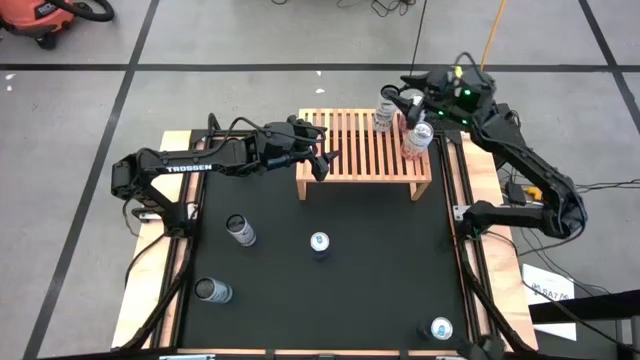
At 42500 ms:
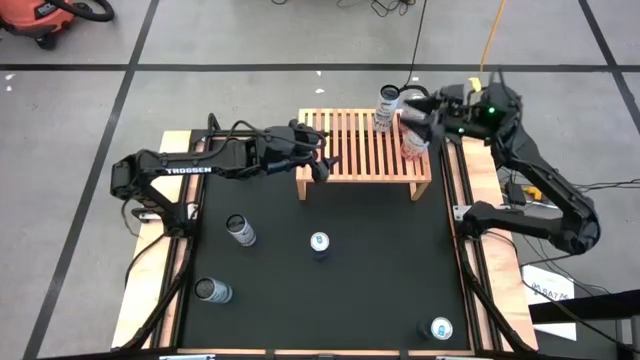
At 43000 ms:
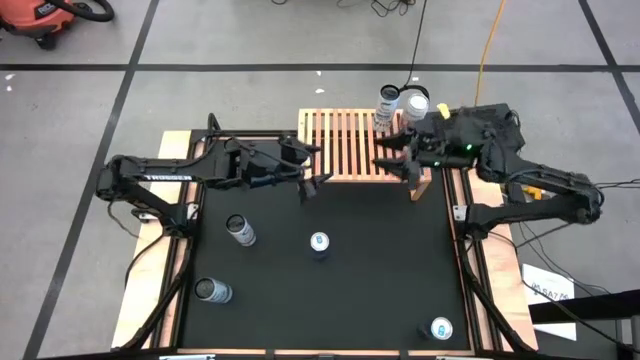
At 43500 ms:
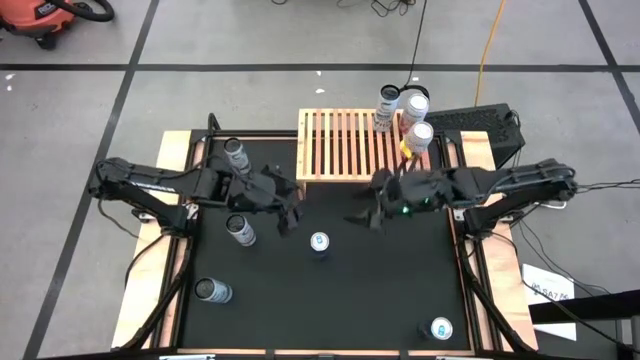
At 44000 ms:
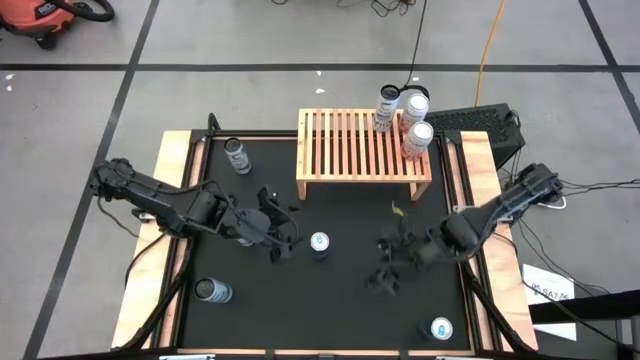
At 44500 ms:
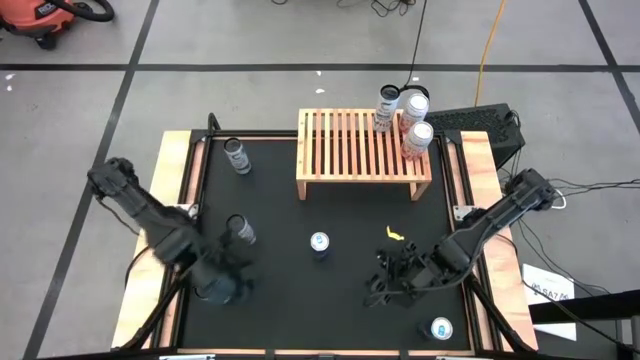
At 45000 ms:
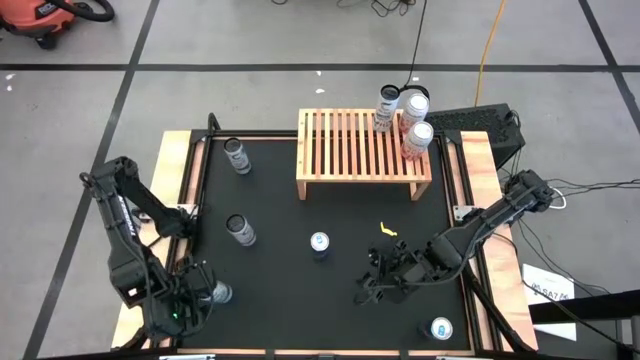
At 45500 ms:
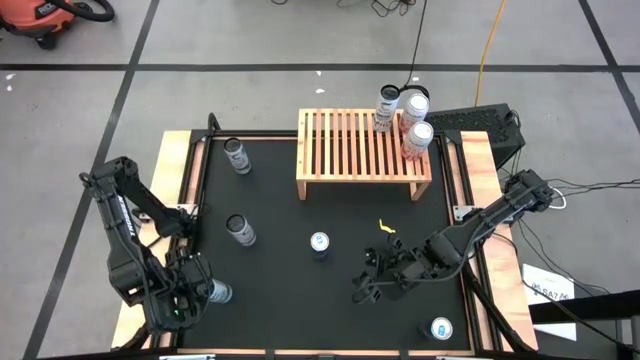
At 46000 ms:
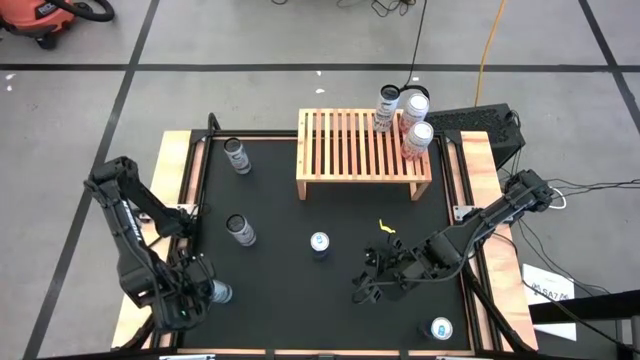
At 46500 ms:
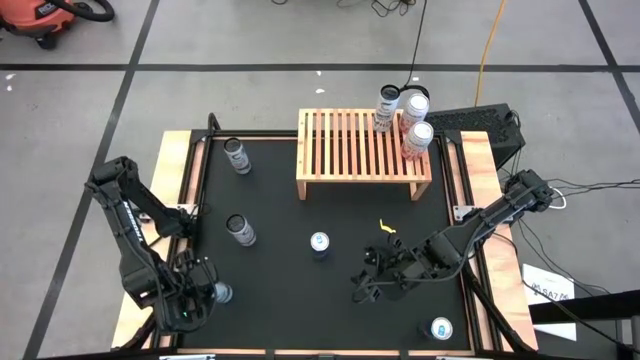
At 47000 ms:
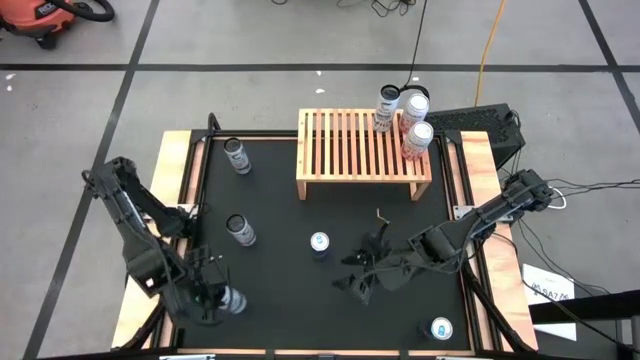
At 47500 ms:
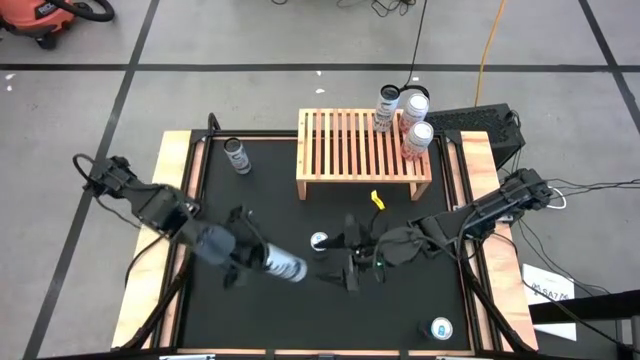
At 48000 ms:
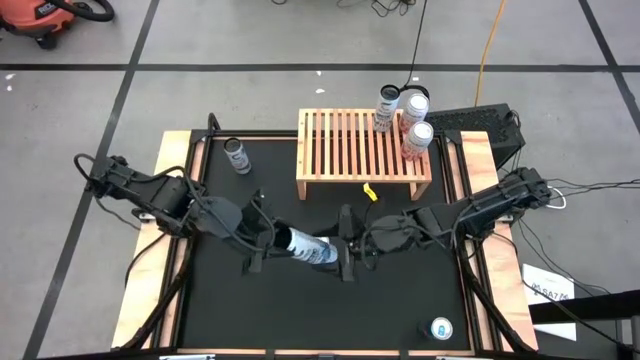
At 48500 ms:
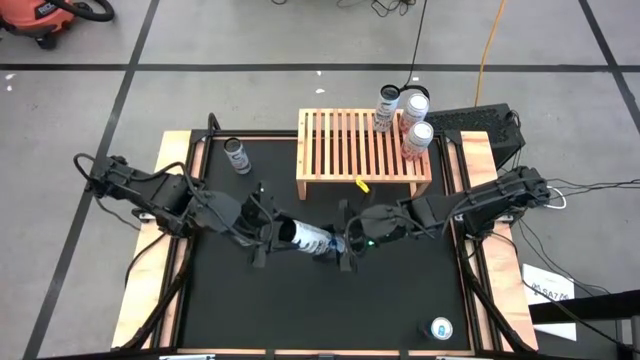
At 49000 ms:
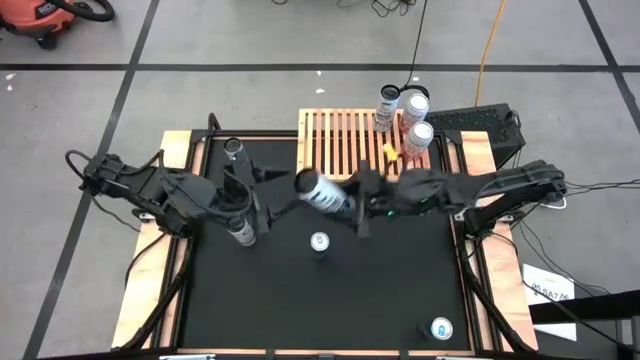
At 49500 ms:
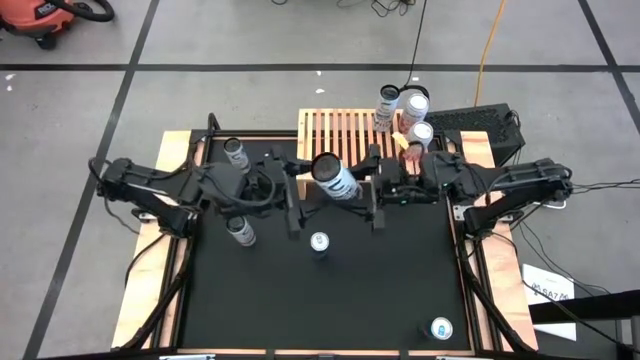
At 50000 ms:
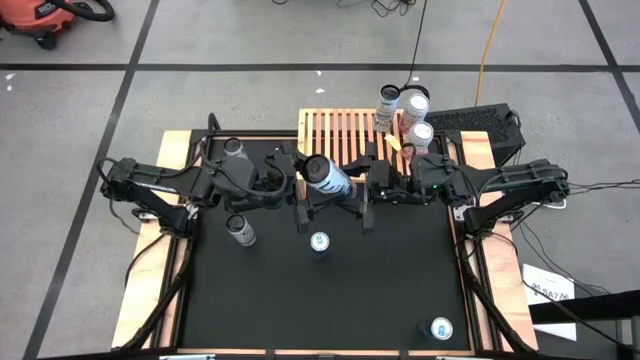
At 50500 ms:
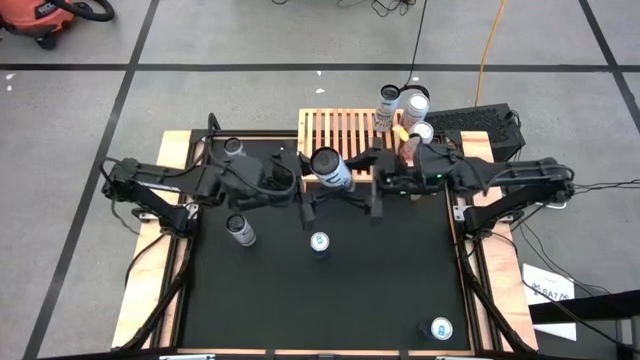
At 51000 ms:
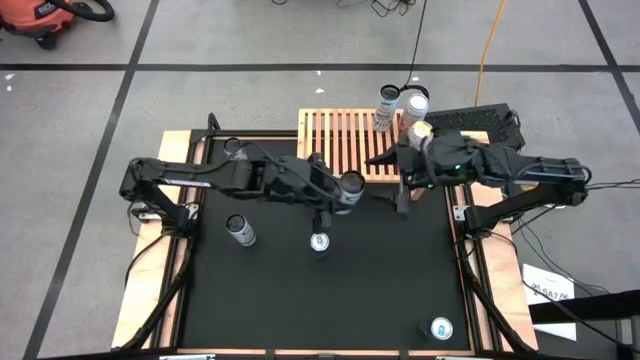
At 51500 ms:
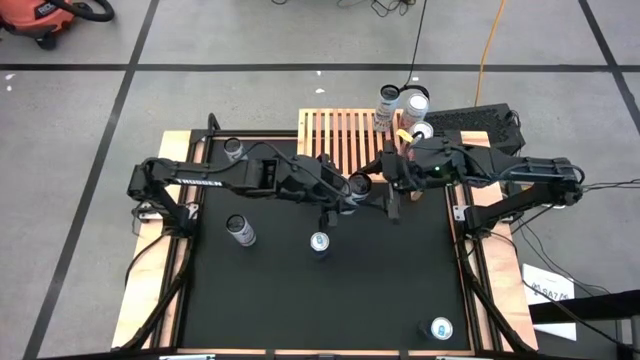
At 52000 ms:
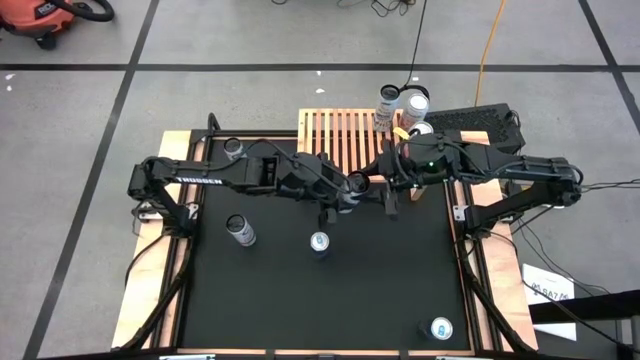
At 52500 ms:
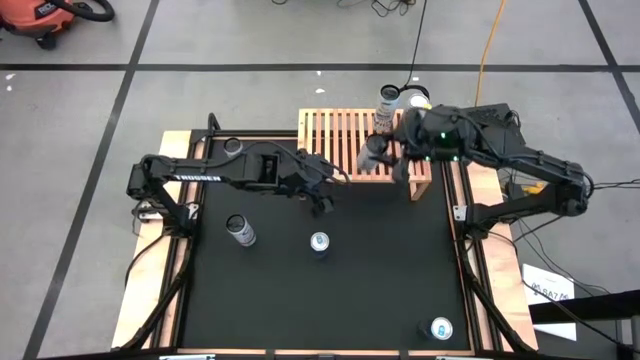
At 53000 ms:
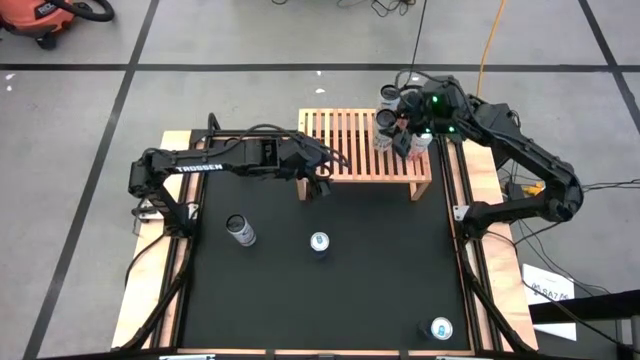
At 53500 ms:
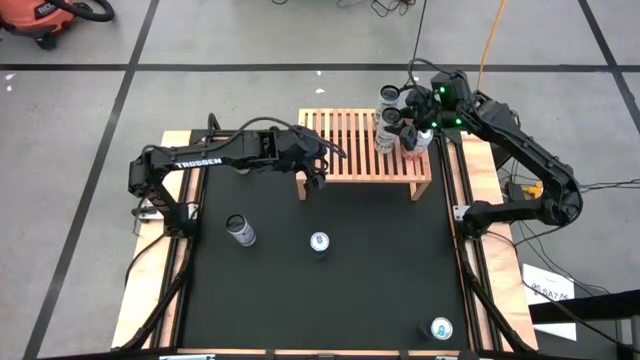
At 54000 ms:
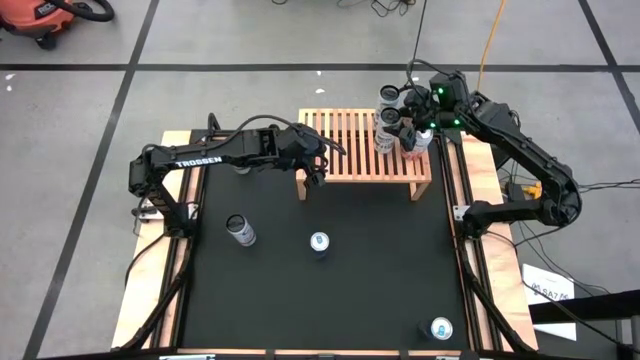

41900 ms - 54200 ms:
Task: Place canned beverage on shelf
Put the bottom left white soda can on the shelf

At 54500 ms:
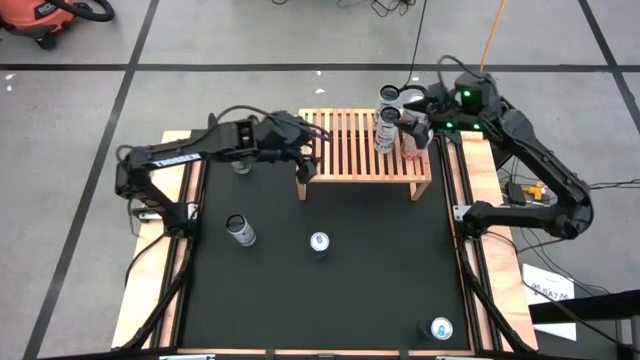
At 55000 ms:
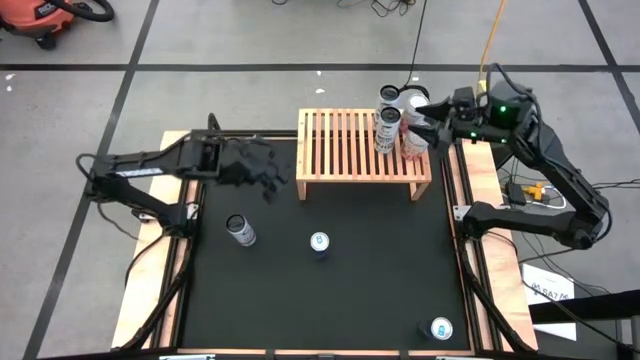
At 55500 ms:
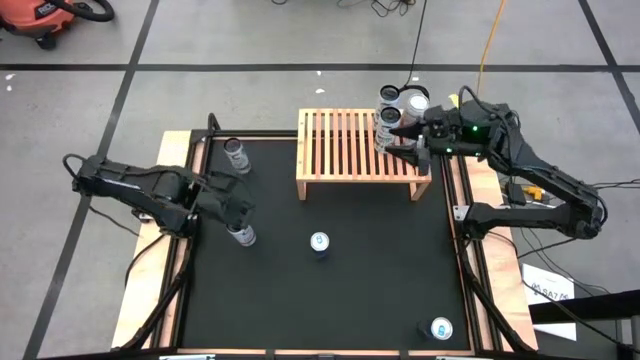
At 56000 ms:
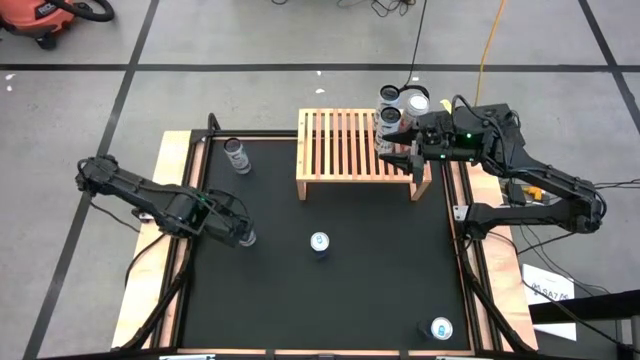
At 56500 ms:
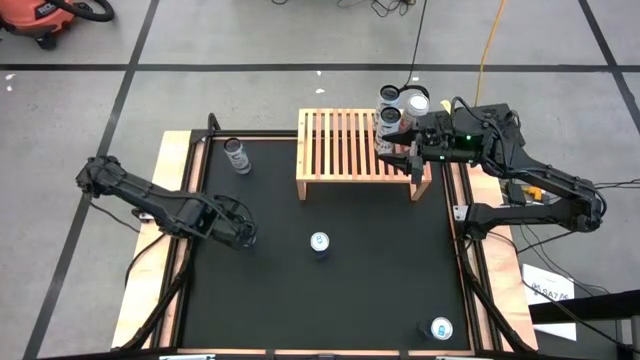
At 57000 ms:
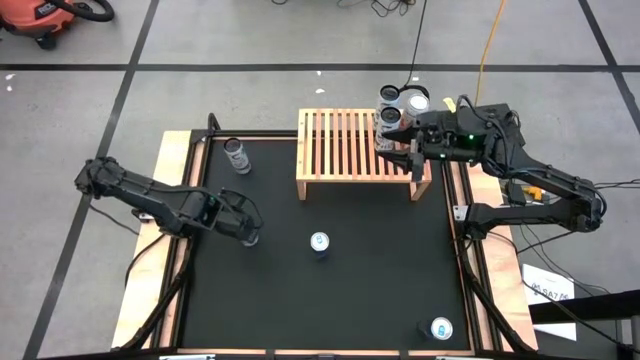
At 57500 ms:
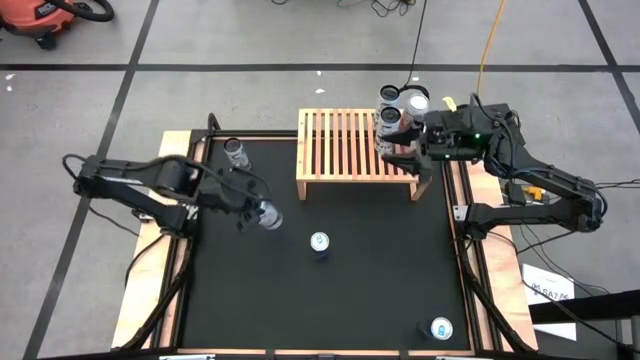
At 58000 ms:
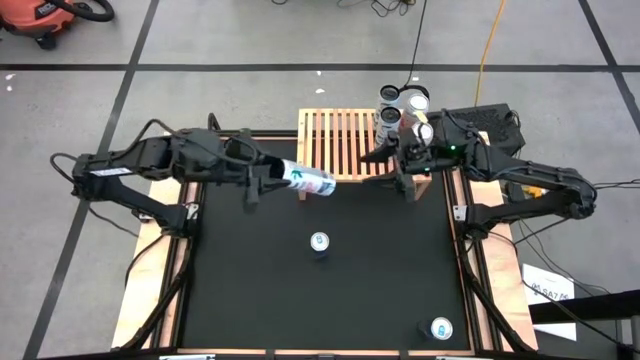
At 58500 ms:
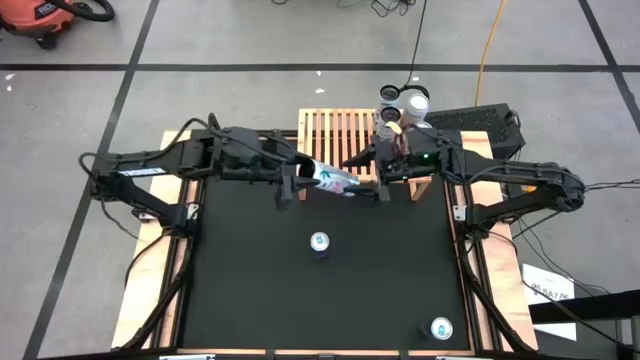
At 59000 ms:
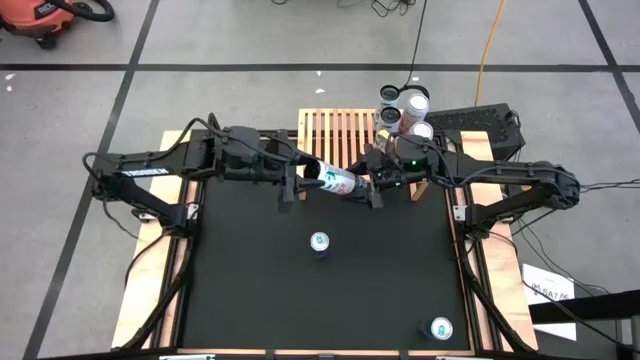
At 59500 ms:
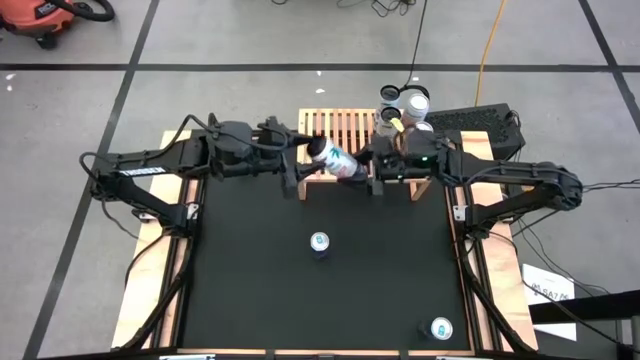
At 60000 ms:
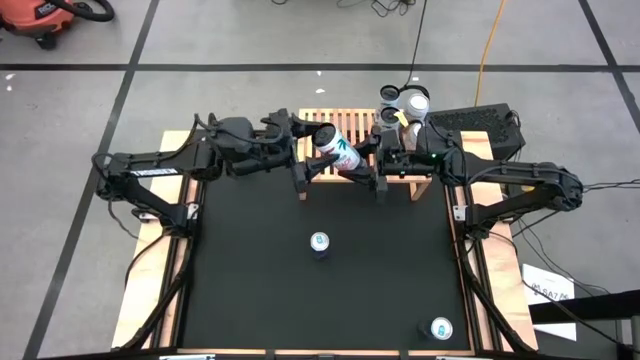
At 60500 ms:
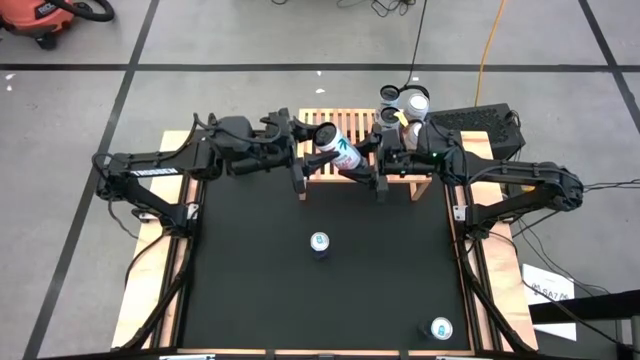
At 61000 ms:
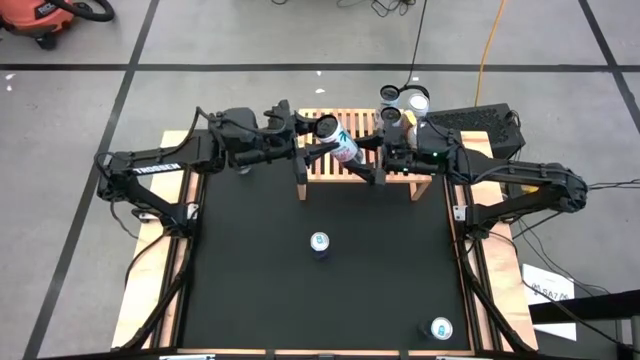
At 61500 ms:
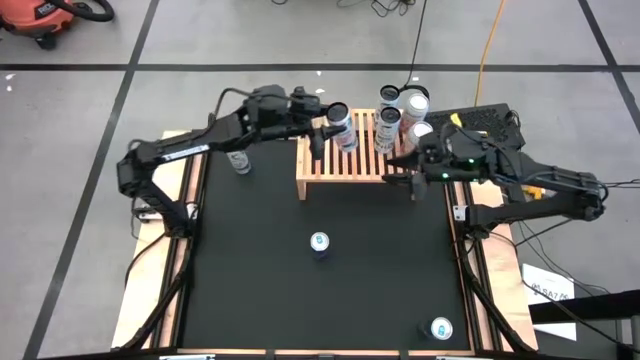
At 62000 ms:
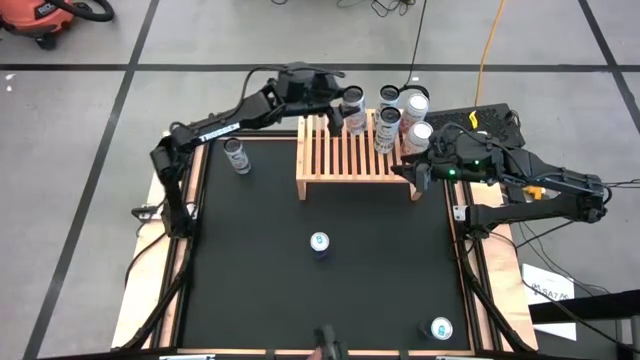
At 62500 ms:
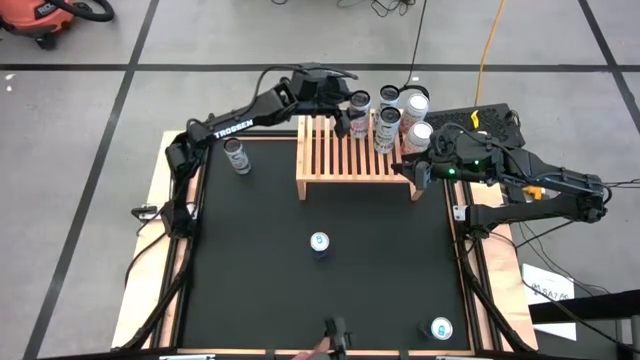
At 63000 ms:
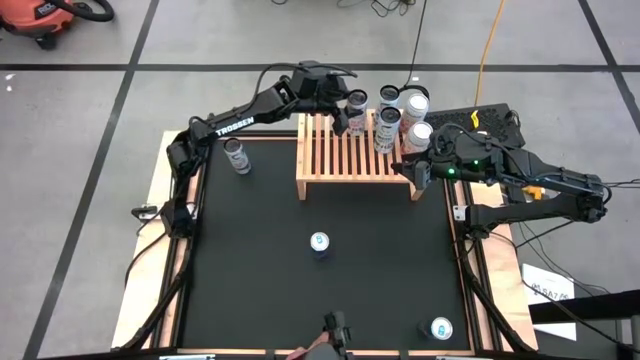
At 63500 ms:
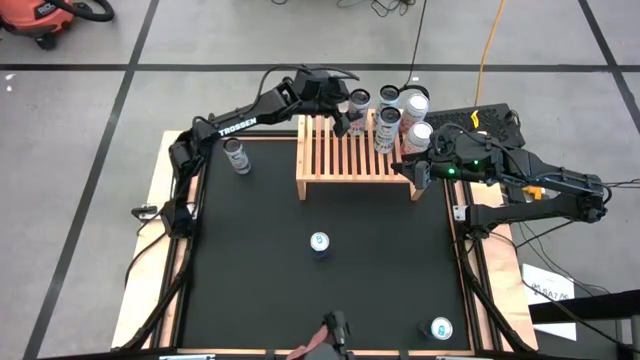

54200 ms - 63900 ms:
Put the bottom white soda can on the shelf
